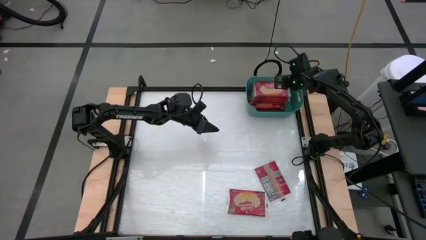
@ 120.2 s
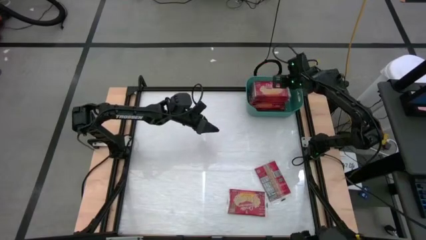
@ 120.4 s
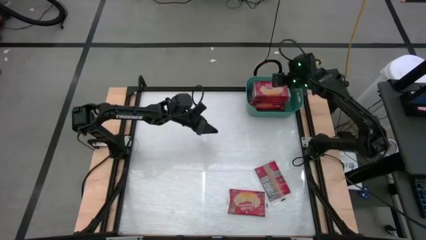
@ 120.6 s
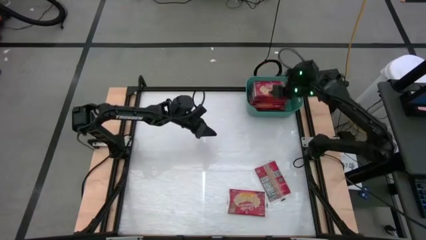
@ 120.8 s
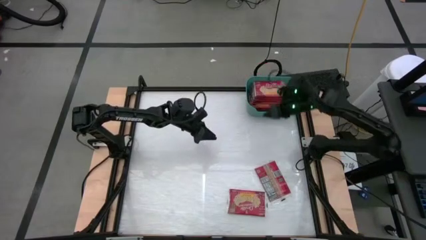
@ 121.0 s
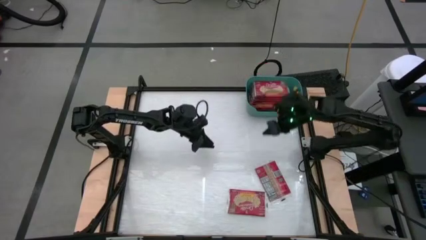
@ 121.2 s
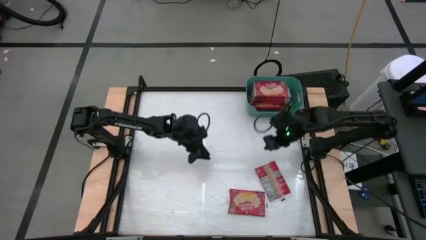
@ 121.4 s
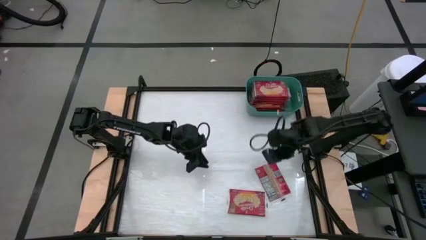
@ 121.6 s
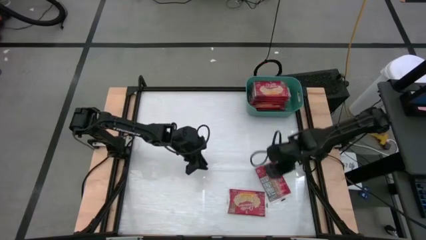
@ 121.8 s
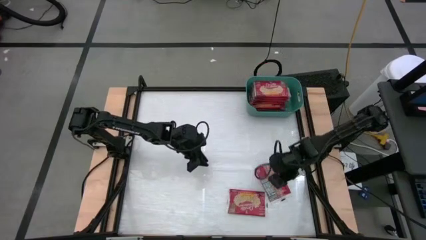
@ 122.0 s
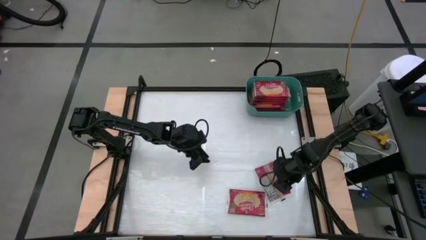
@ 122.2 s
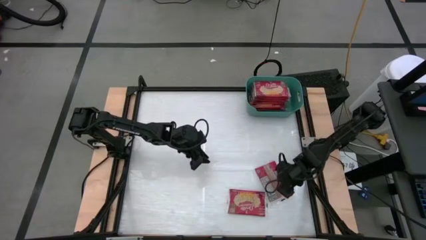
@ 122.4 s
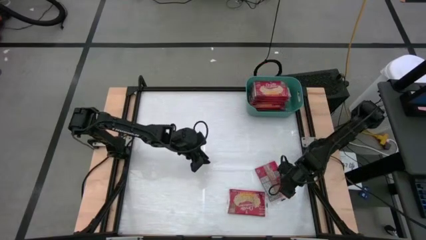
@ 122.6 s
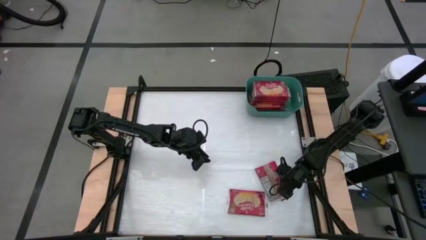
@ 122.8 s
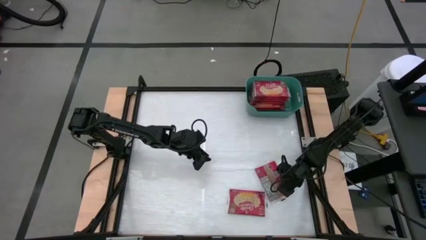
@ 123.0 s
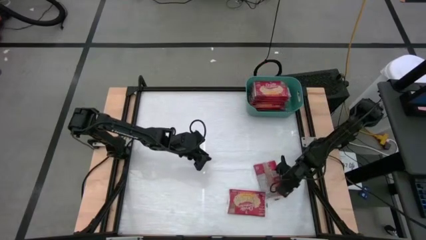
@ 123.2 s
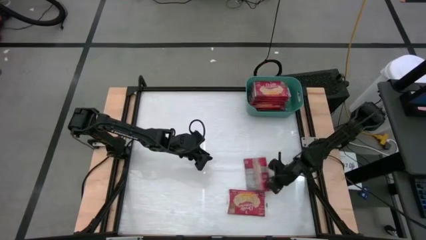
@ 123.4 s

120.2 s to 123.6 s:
Task: Sort popcorn bags into baskets
Put the red popcorn bag into the green bin

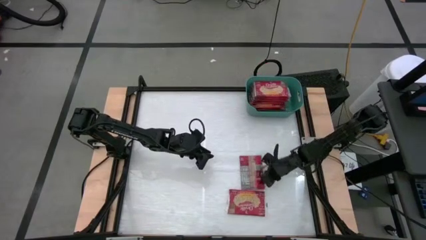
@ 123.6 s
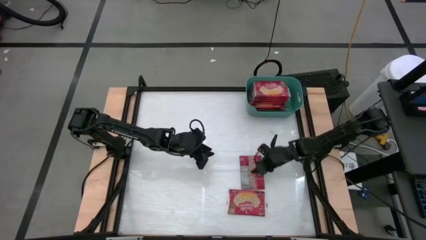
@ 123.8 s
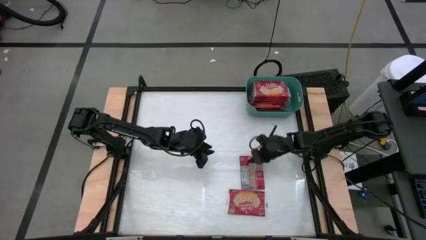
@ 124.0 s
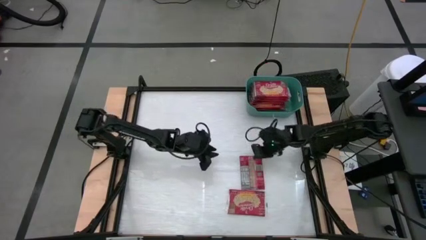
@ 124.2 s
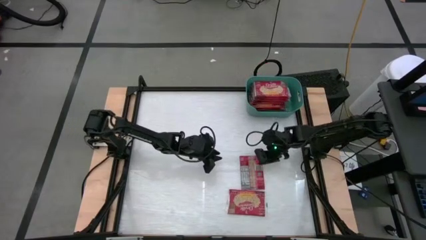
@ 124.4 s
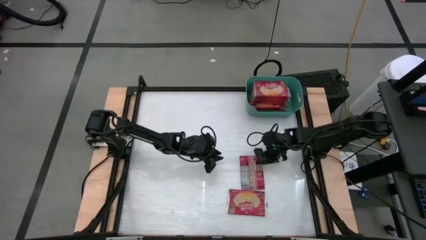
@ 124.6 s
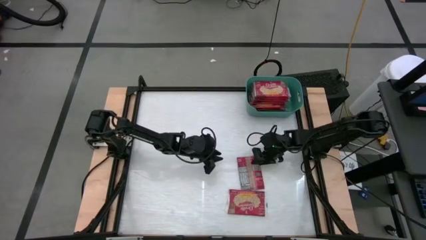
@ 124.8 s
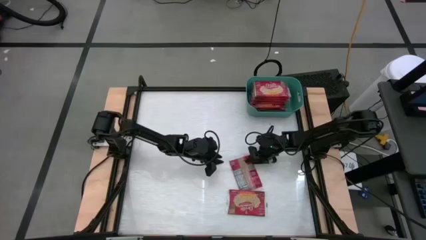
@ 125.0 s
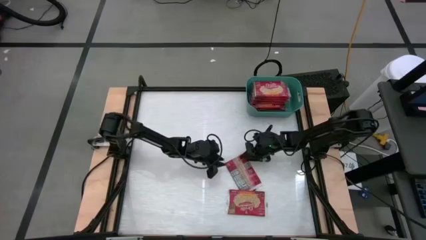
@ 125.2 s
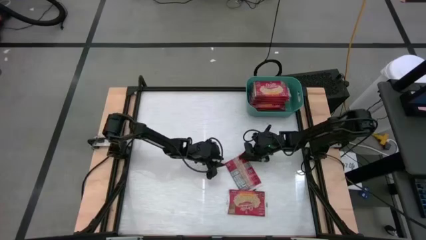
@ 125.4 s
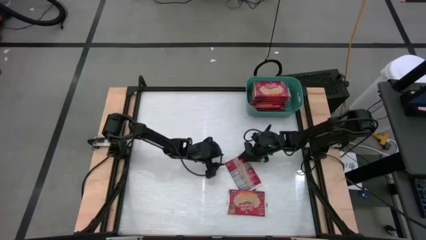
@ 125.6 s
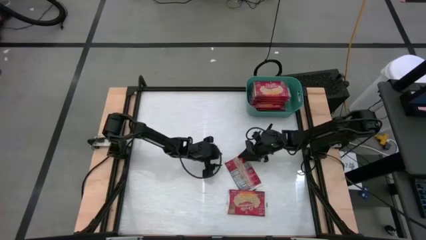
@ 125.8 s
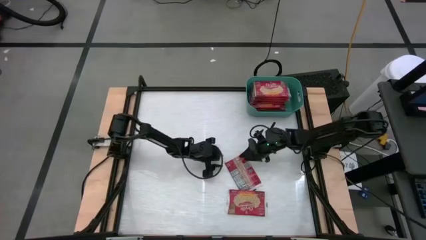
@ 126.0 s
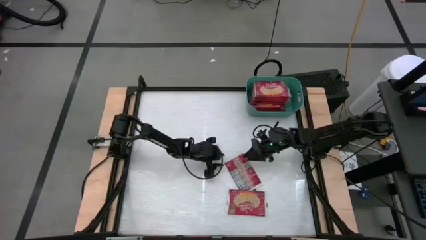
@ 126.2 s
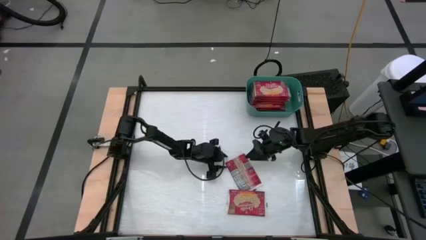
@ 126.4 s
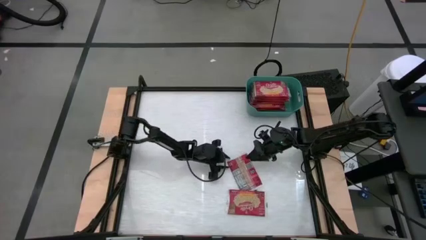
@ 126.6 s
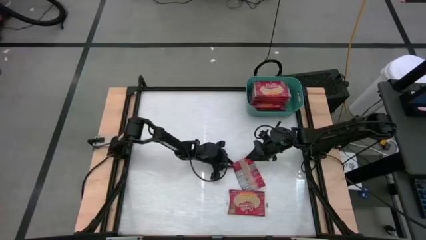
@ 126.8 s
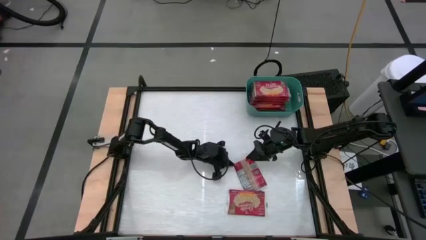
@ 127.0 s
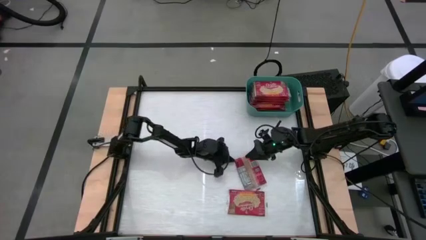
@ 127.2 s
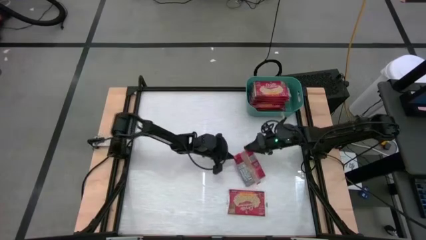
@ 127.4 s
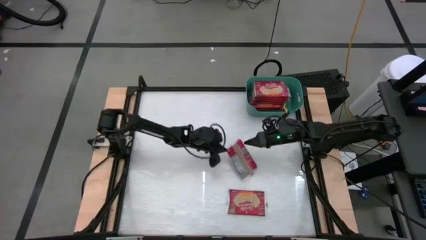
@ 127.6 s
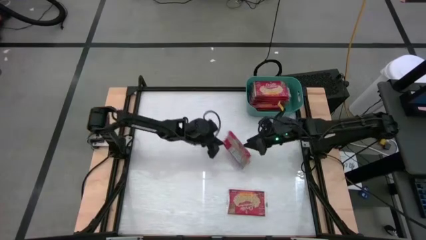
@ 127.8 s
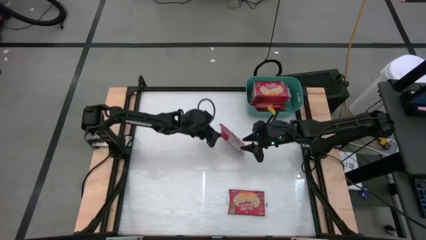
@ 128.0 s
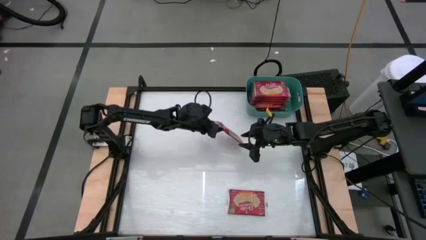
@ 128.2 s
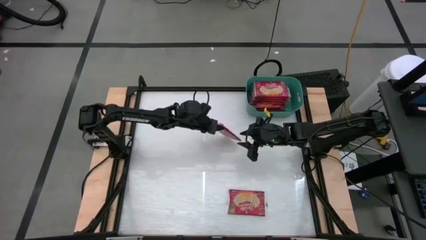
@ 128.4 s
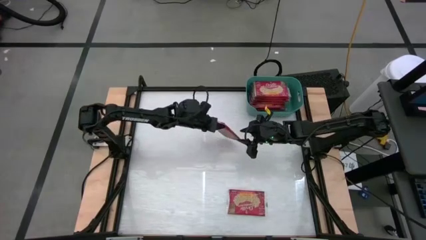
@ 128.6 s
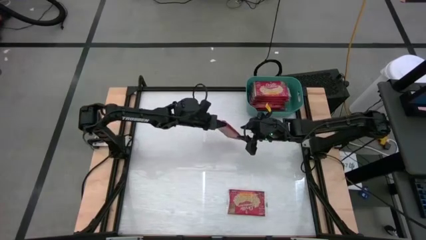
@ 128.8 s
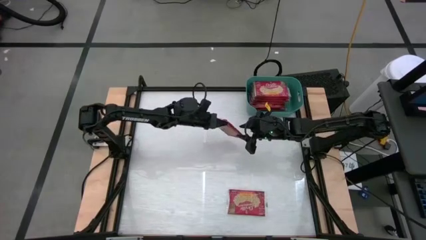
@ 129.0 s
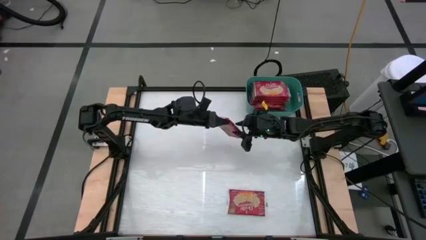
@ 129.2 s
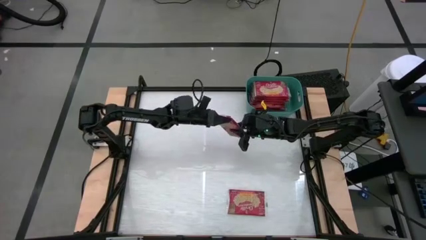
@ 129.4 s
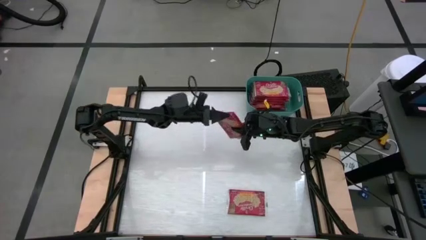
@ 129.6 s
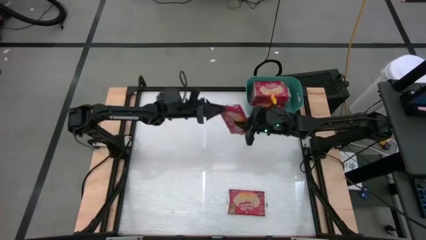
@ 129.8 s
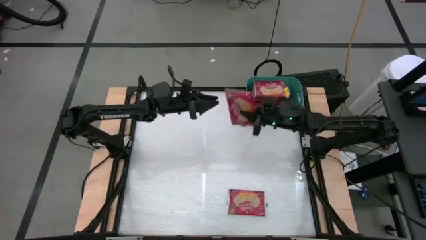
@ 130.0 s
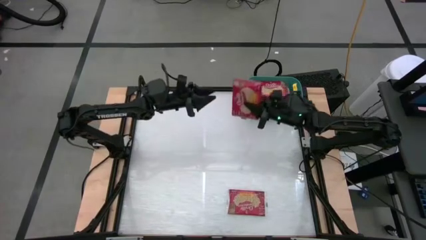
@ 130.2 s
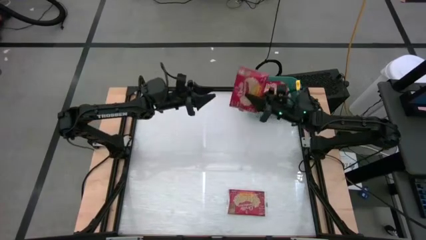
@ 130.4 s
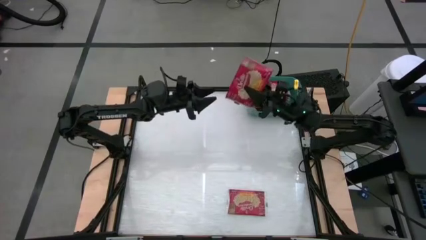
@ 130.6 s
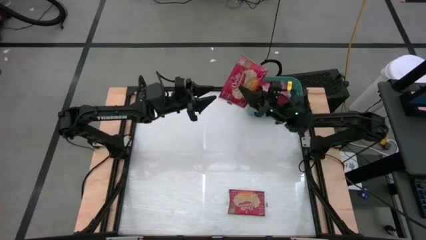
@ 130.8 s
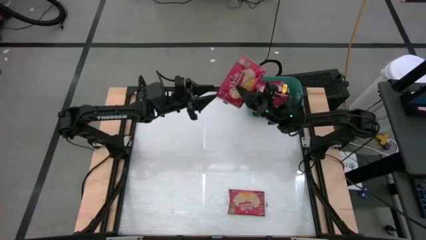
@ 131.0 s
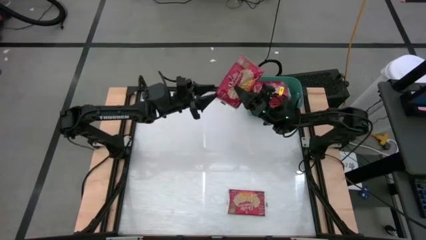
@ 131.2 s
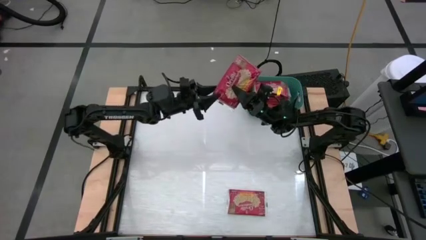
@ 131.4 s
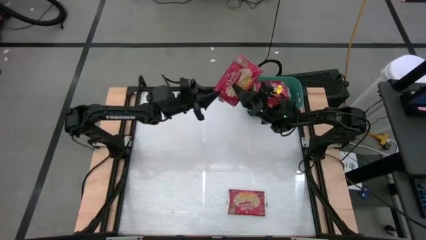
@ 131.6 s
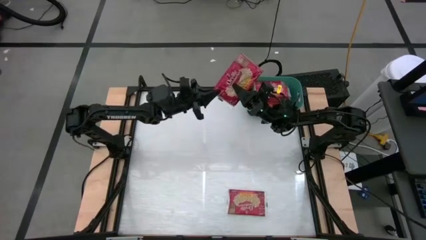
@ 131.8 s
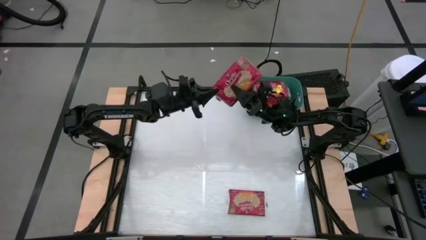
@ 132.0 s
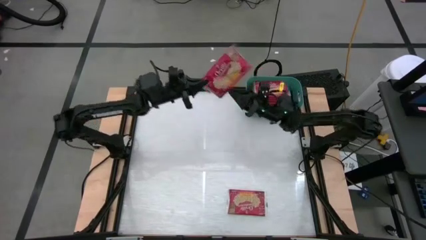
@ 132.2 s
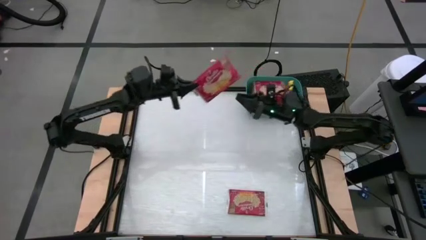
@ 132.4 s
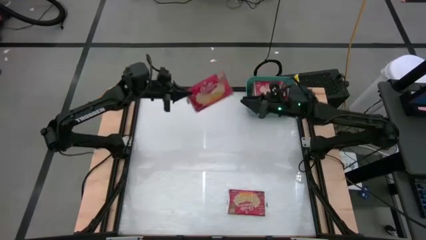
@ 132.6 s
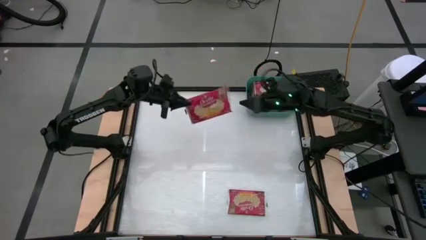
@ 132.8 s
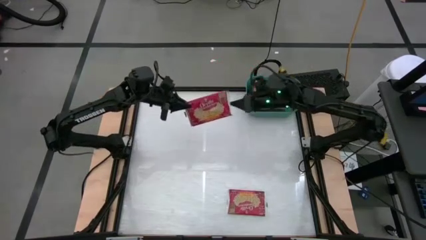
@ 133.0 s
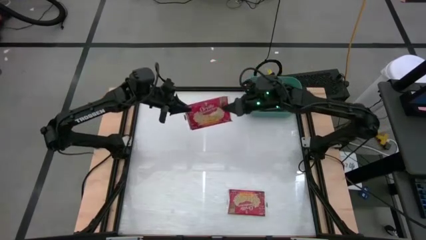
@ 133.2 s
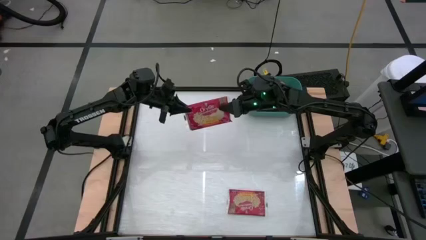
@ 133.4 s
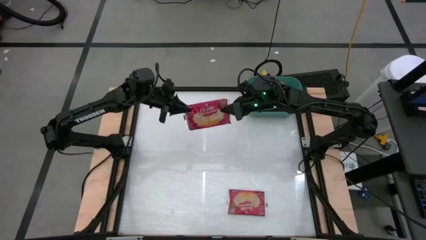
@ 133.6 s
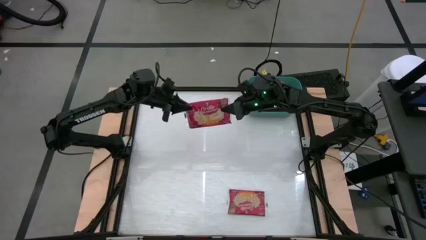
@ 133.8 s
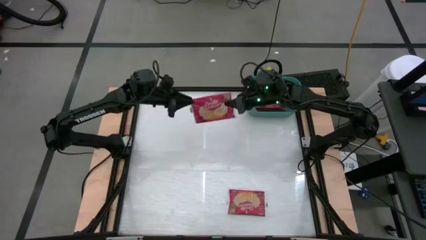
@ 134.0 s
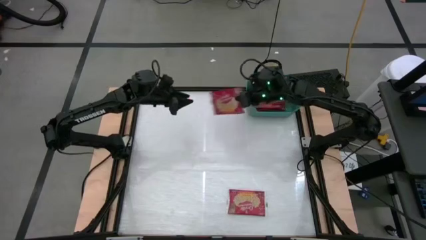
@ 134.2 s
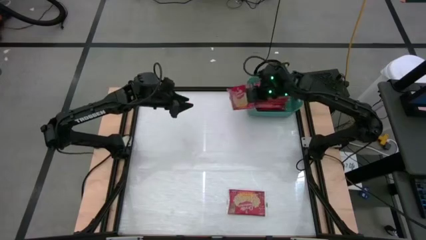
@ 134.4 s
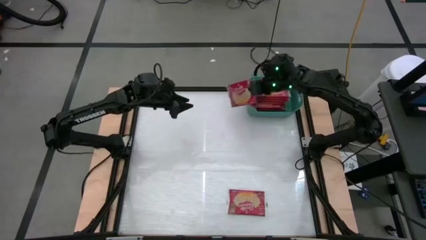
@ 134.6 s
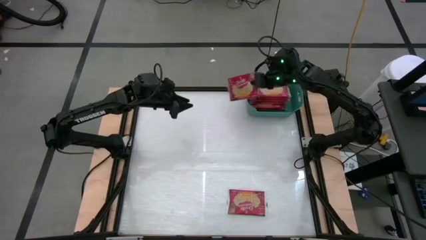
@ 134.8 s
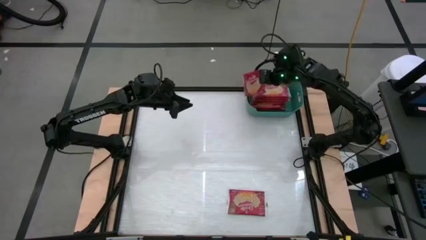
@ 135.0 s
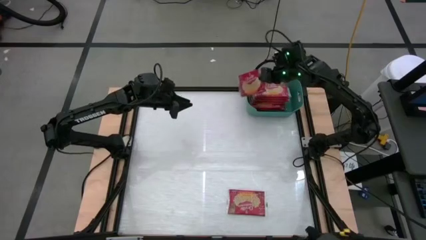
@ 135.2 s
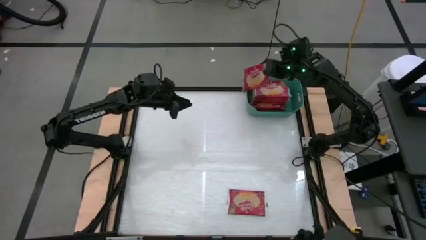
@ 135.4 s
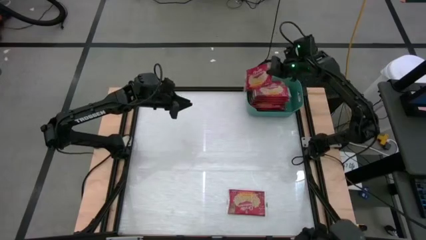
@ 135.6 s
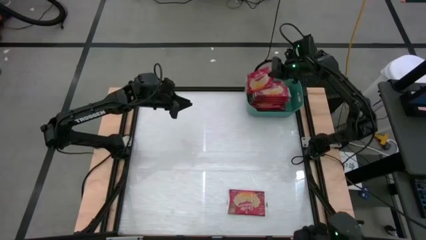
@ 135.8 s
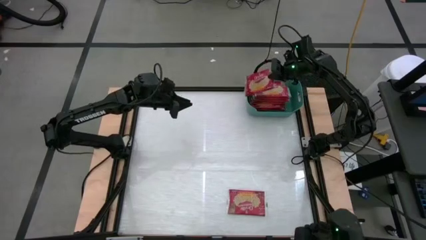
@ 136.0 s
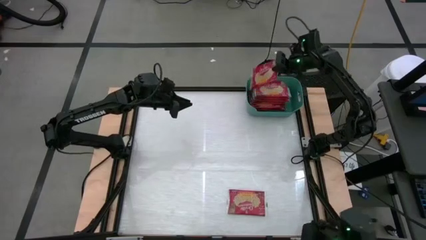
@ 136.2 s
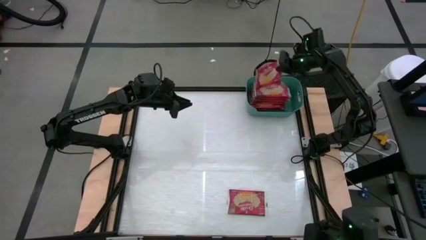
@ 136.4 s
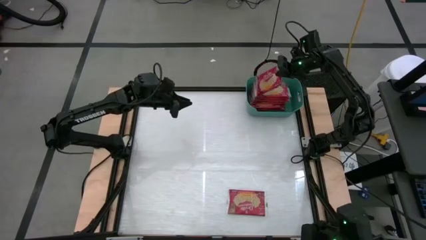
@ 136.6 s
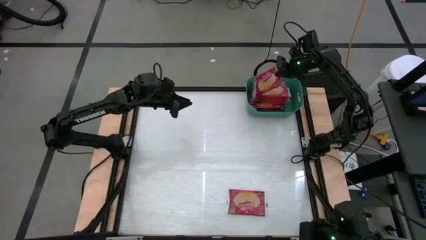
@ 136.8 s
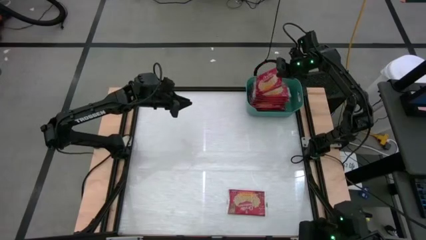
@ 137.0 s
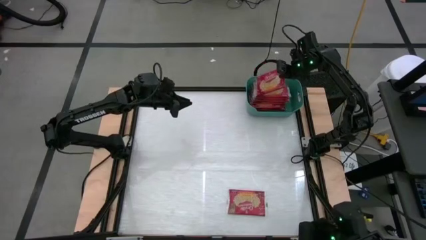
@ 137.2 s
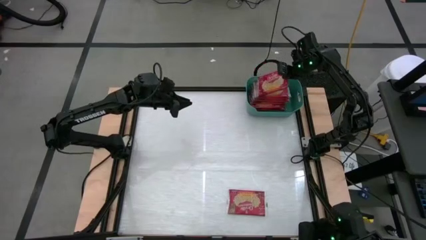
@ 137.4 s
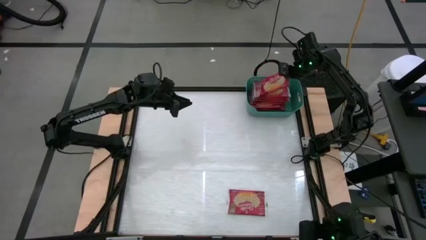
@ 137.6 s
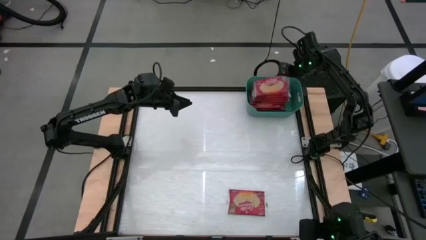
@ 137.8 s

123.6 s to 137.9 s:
Put the red popcorn bag into the green bin
